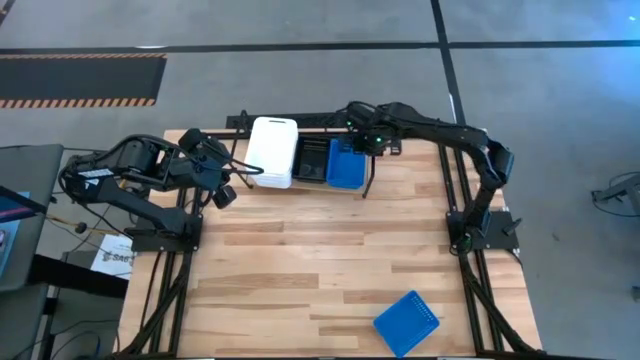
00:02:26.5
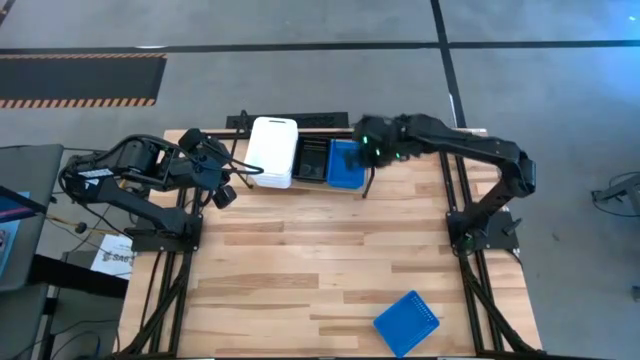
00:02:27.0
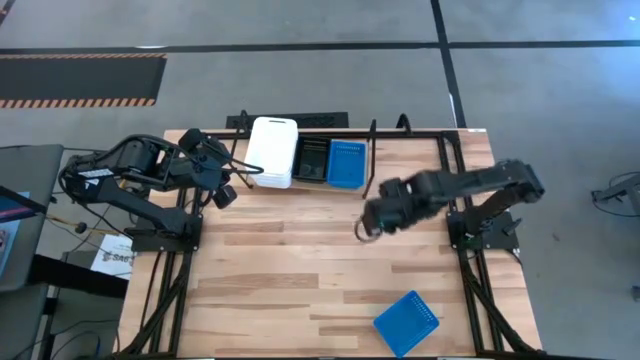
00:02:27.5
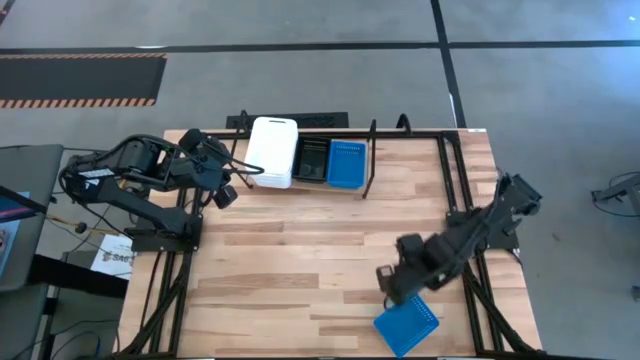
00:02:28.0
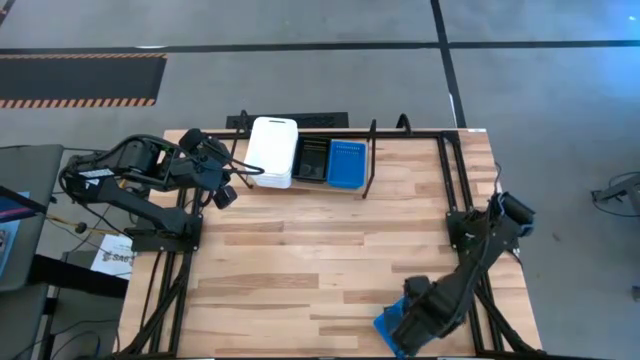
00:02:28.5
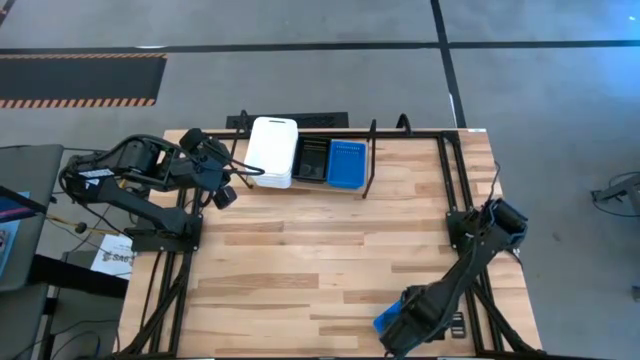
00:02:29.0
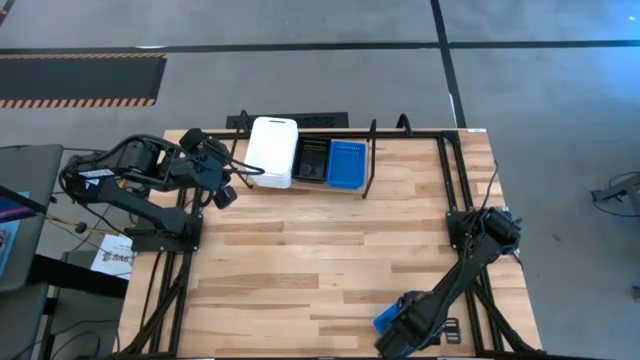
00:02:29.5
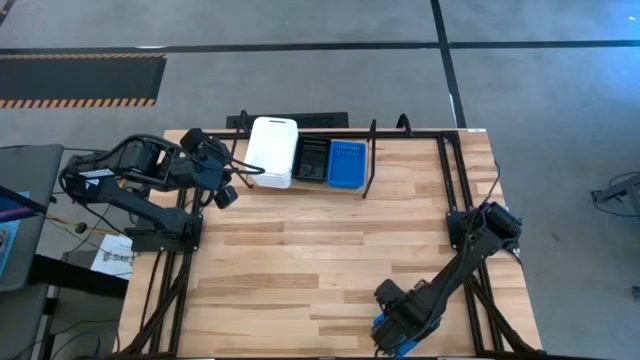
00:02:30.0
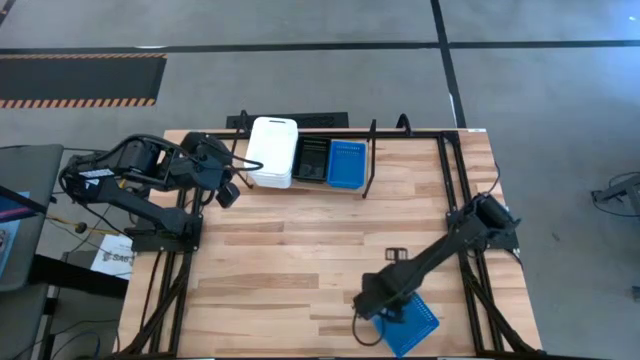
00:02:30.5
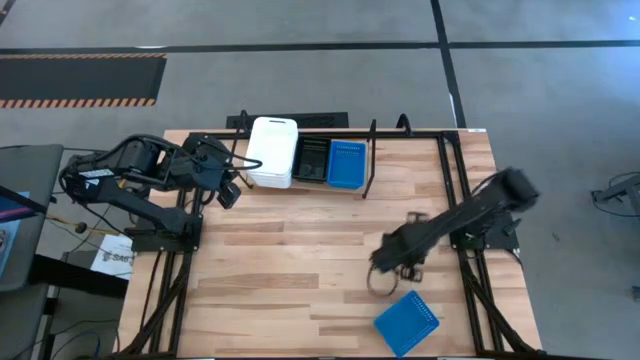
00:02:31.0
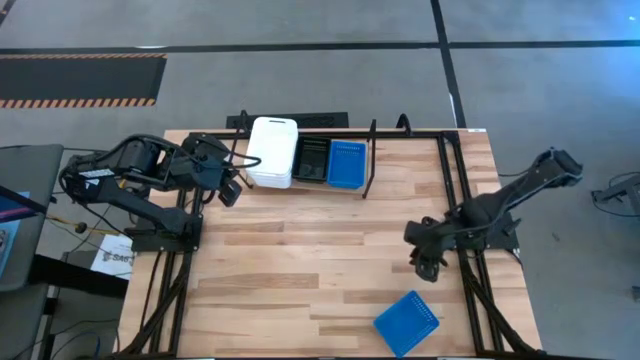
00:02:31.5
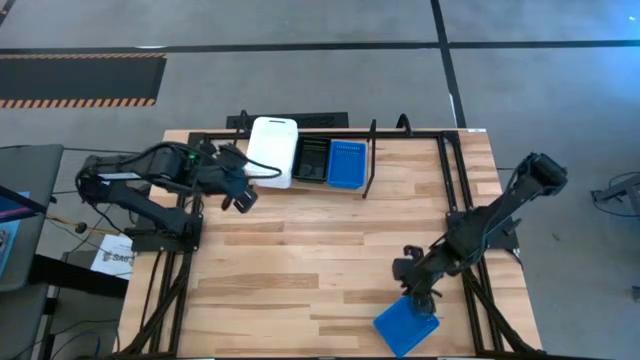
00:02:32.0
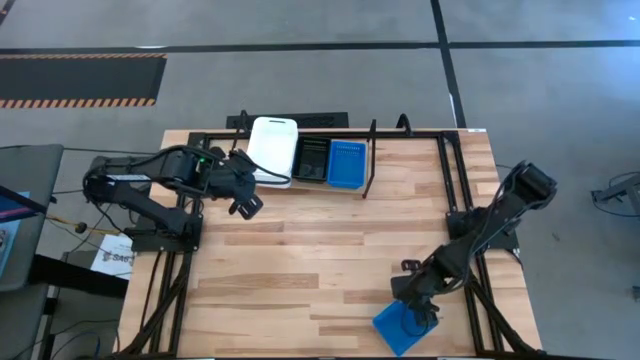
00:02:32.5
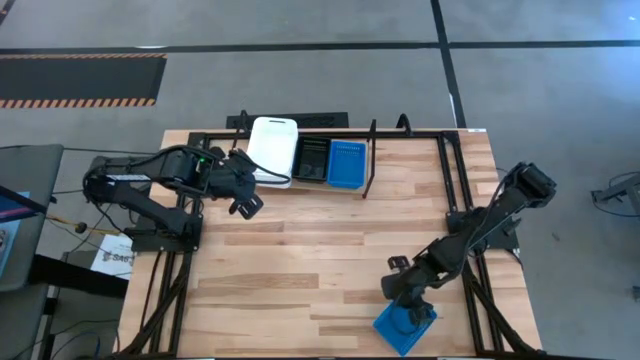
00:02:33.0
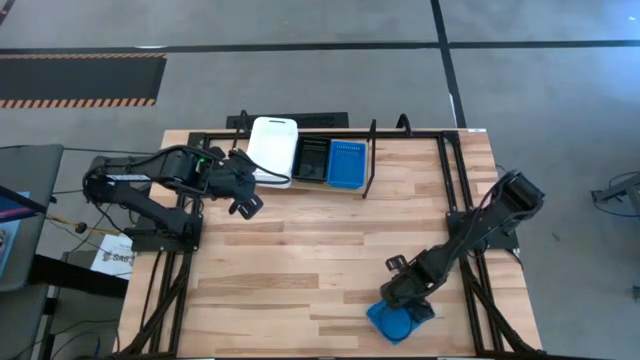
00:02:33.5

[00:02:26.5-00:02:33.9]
Task: Stack baskets on shelf by color
Stack the blue bin on top of the blue bin on the shelf

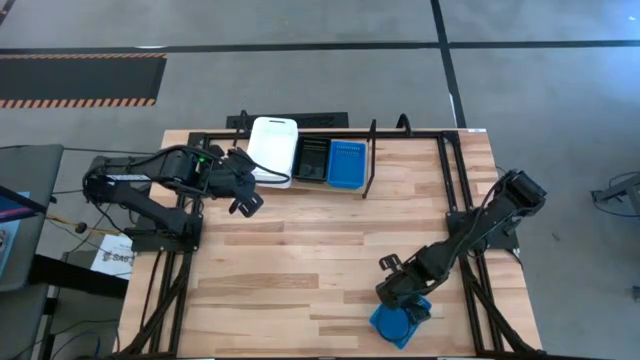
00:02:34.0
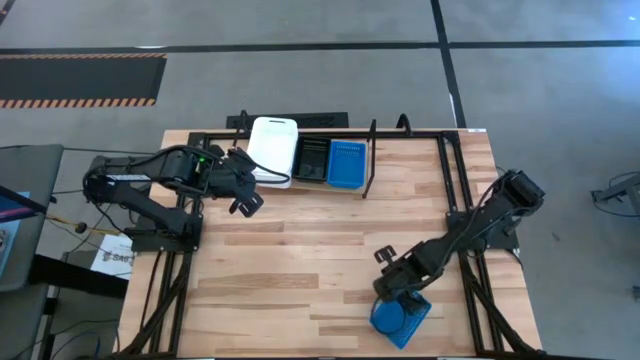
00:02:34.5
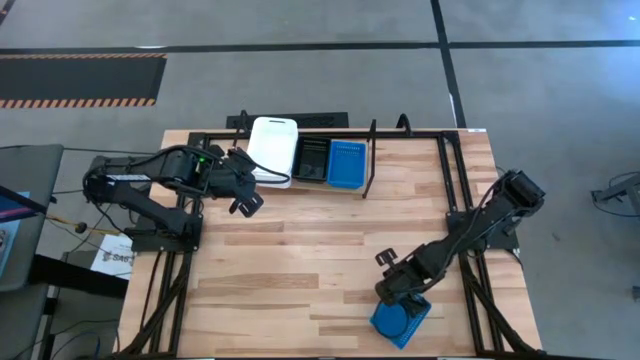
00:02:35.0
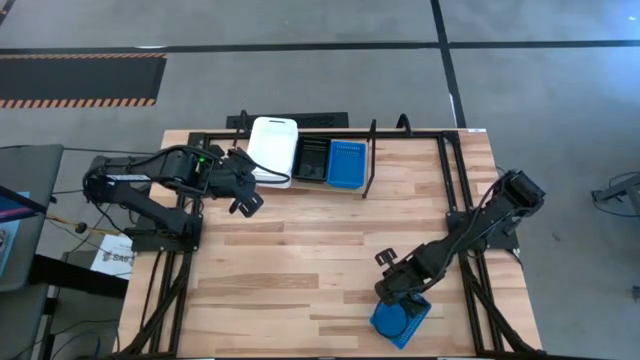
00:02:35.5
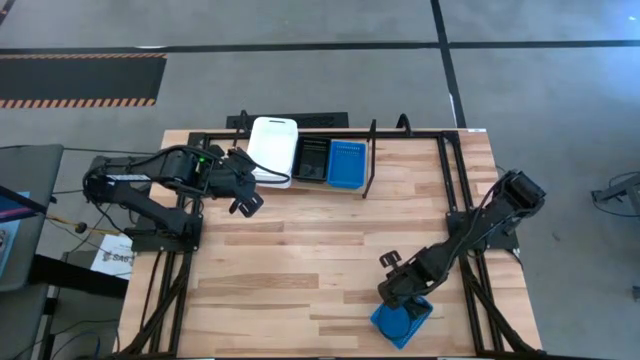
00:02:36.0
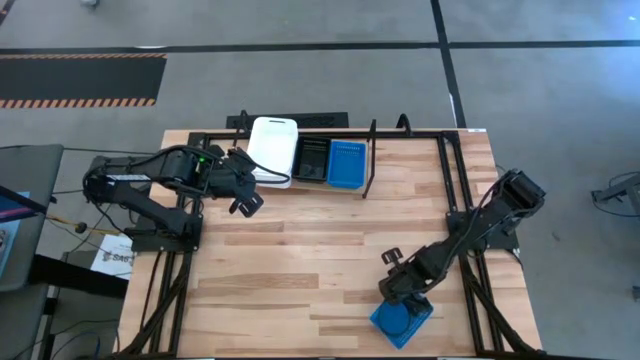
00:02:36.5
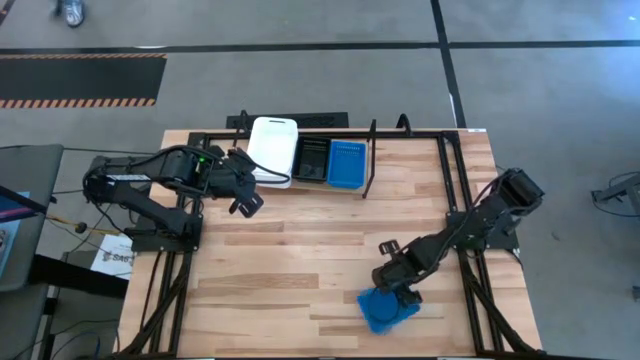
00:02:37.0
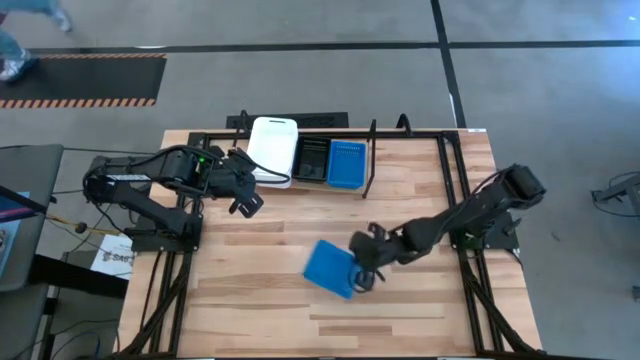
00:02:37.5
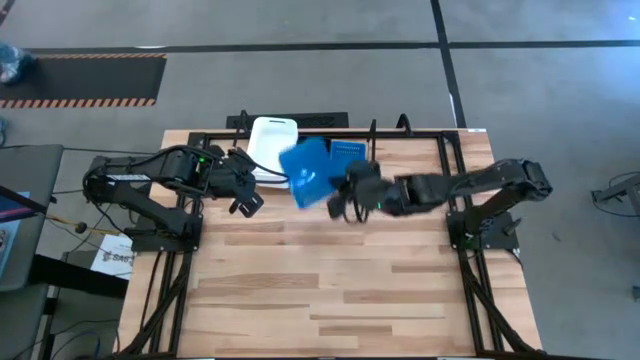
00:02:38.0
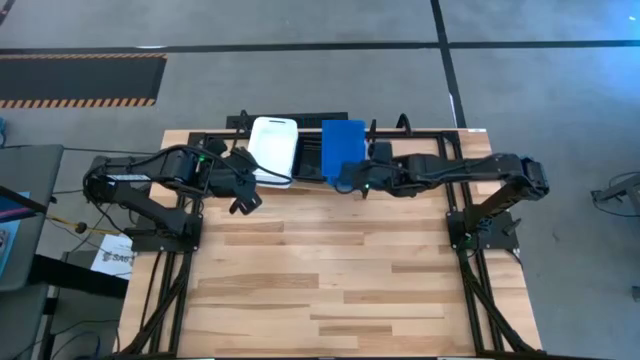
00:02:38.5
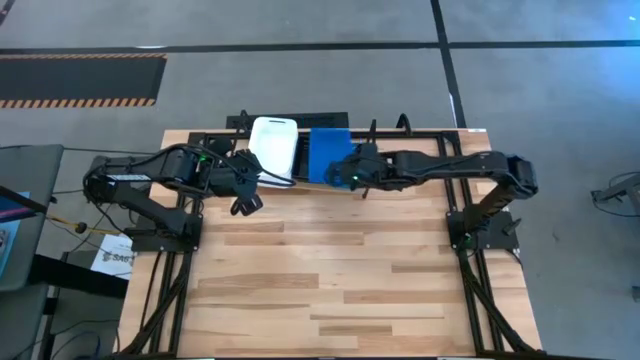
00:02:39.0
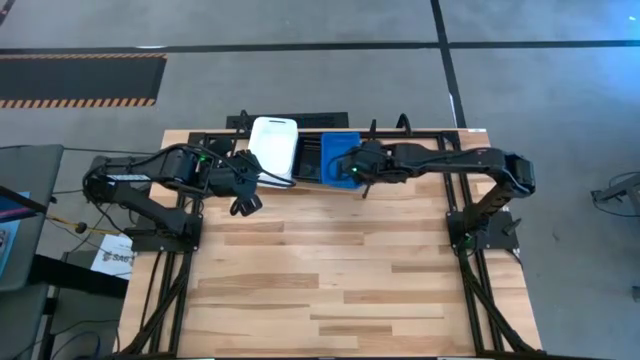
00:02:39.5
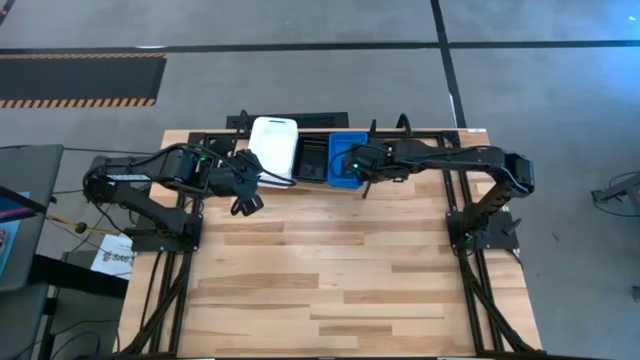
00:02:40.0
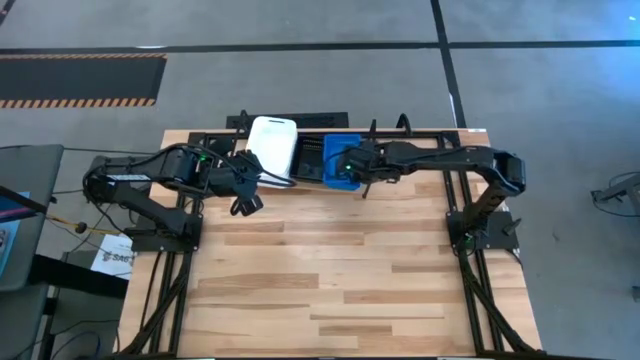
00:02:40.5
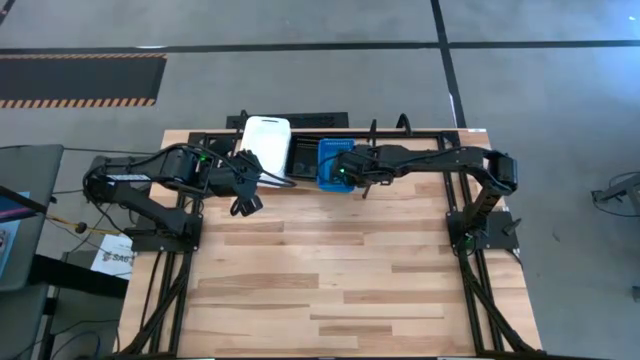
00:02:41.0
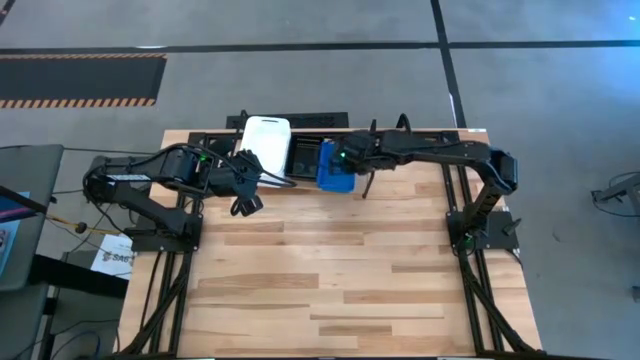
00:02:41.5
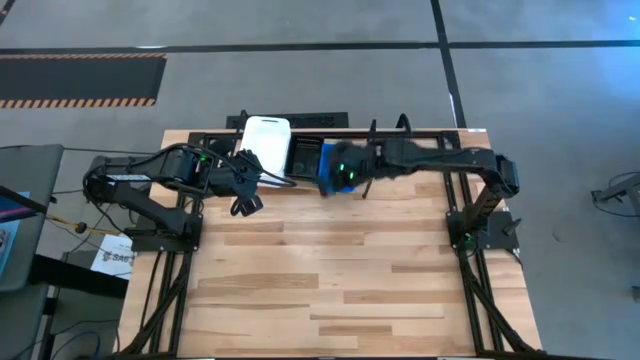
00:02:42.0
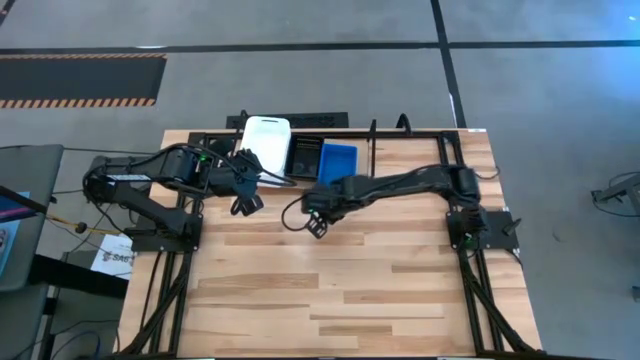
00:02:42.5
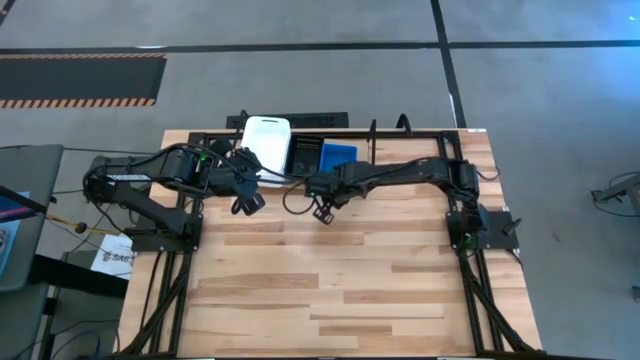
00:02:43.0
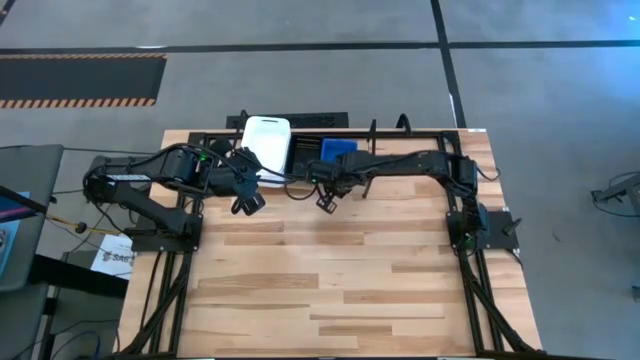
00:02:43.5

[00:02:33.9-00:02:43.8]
Stack the blue bin on top of the blue bin on the shelf

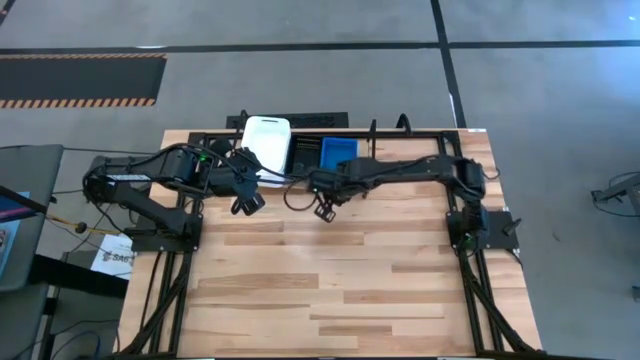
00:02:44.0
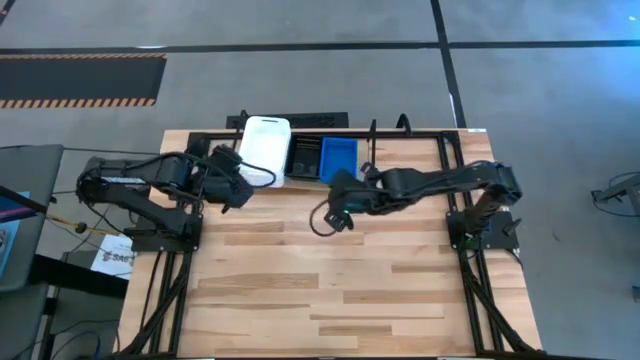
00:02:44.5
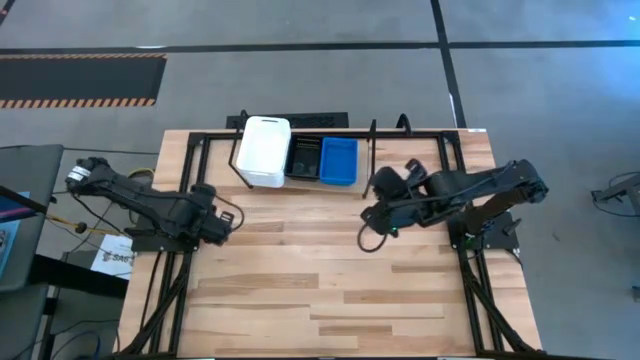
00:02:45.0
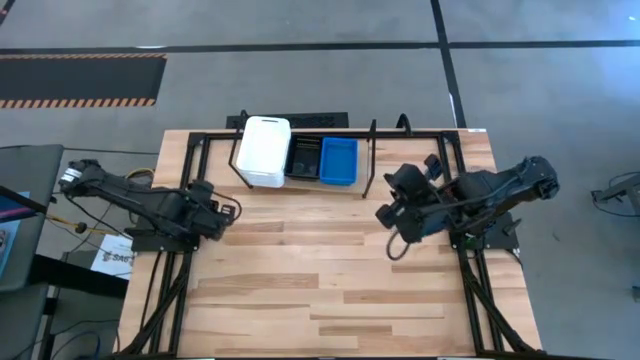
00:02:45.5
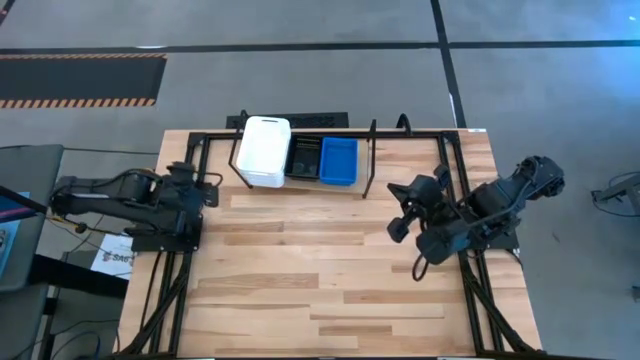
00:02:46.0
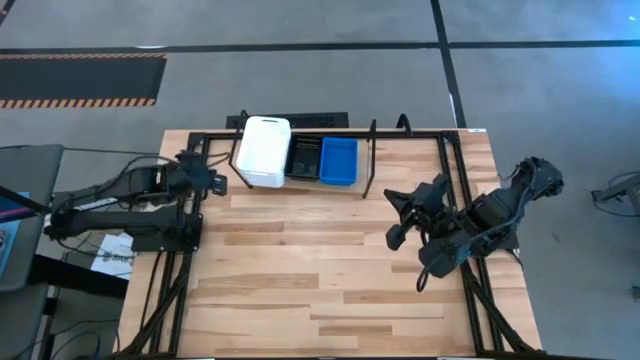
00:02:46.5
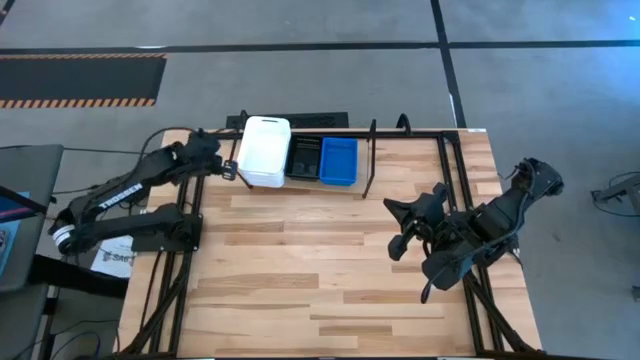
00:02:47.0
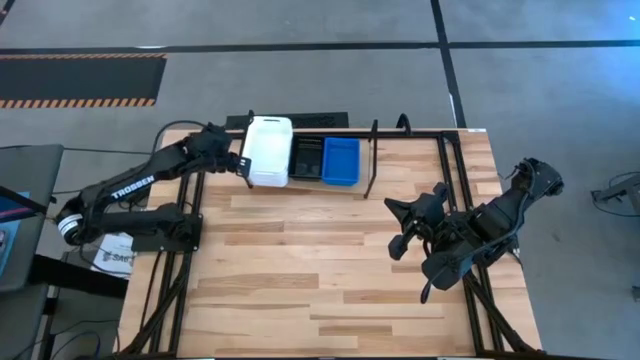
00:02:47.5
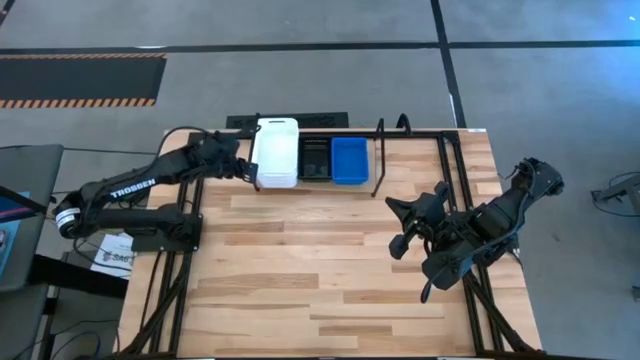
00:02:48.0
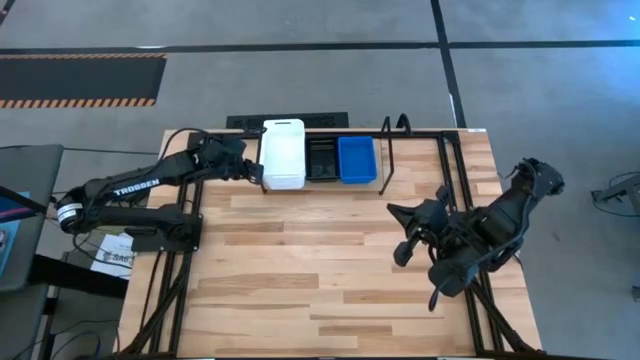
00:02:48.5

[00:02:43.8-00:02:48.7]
Adjust the shelf
